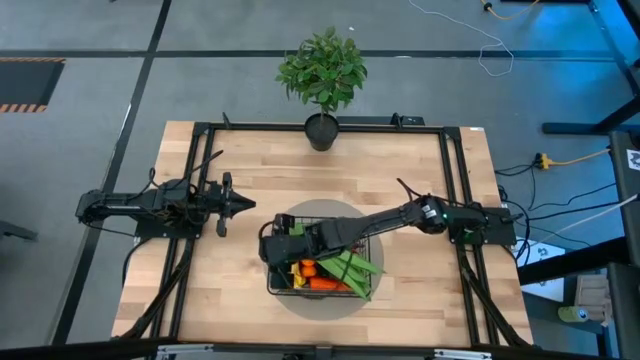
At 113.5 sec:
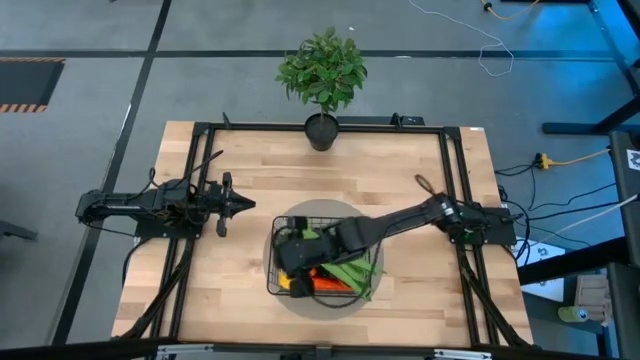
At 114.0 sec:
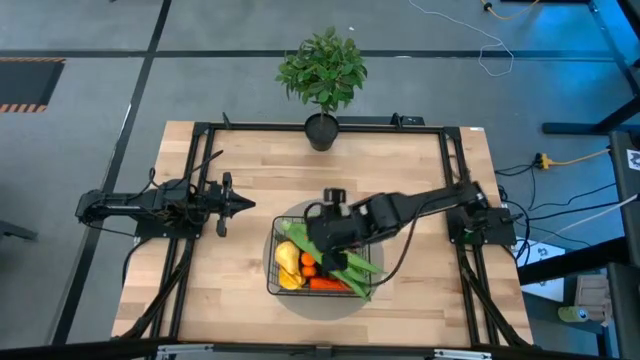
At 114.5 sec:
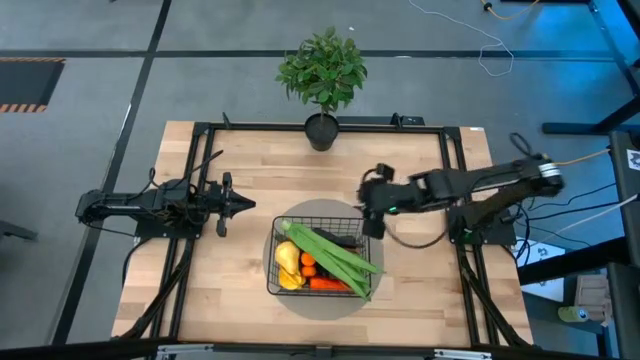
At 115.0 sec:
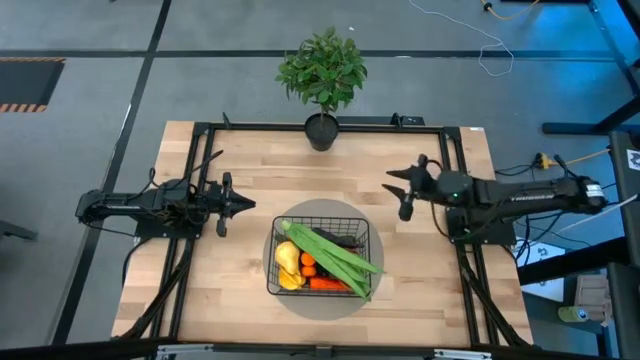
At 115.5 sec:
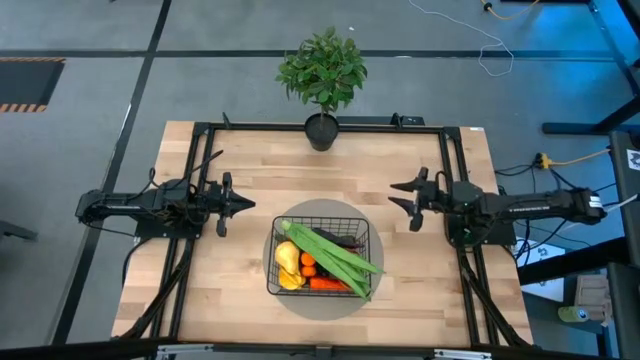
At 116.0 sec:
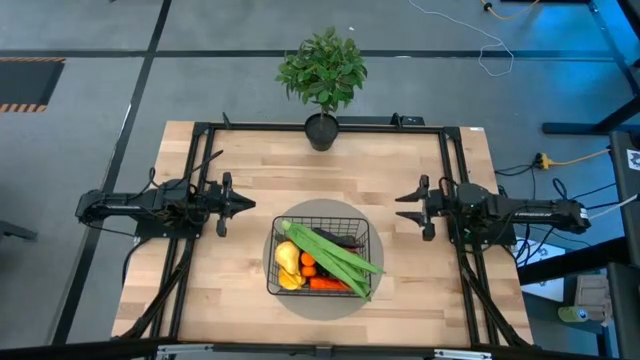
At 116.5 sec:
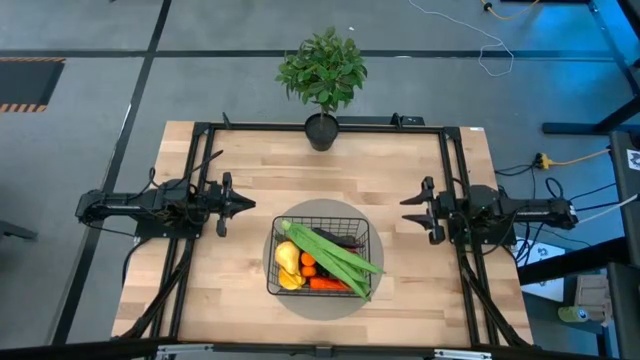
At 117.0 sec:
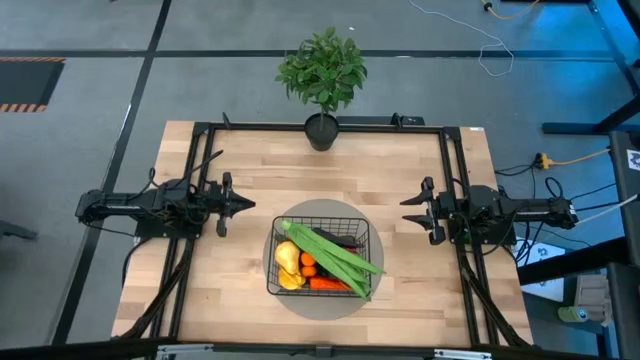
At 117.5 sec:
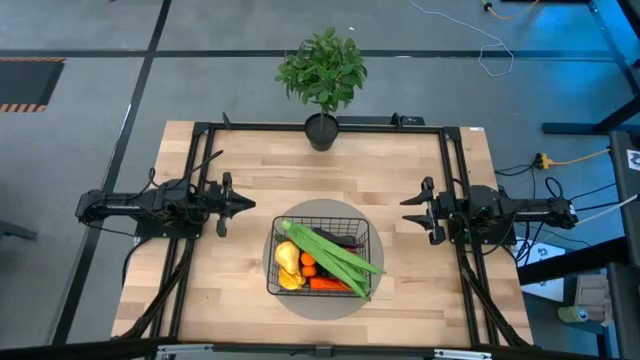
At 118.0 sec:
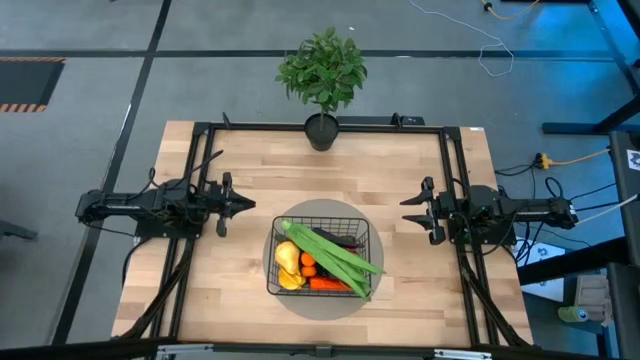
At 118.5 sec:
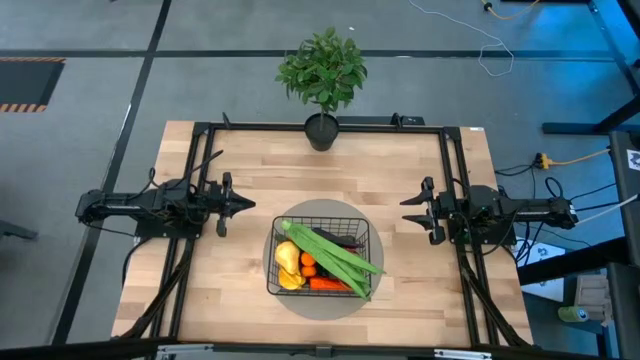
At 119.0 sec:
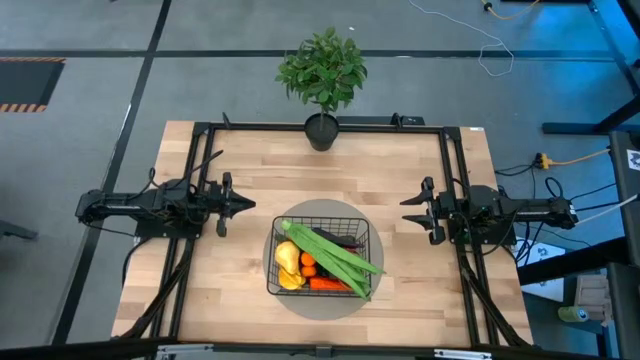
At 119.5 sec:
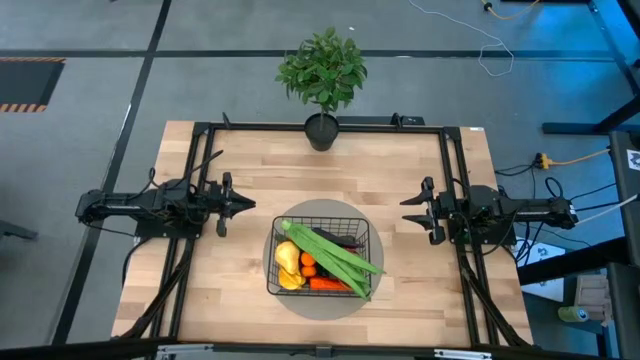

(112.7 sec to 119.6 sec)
Task: Build produce basket
Return to Home Position

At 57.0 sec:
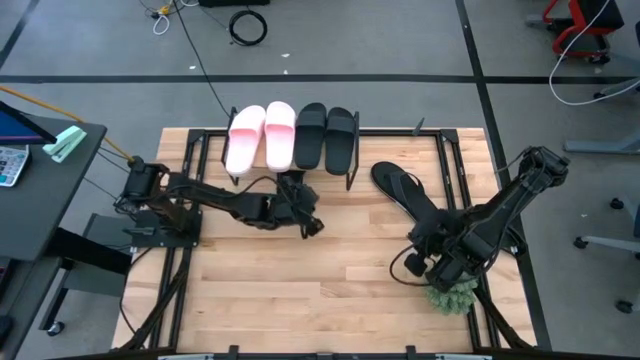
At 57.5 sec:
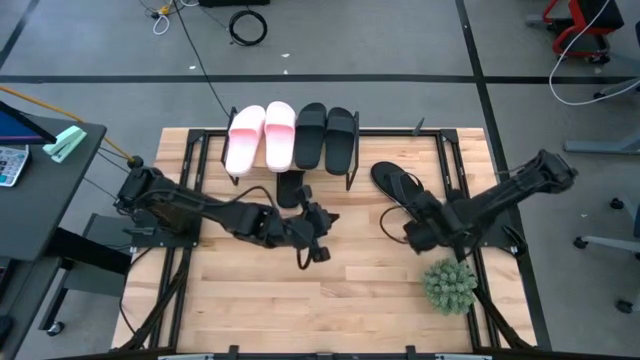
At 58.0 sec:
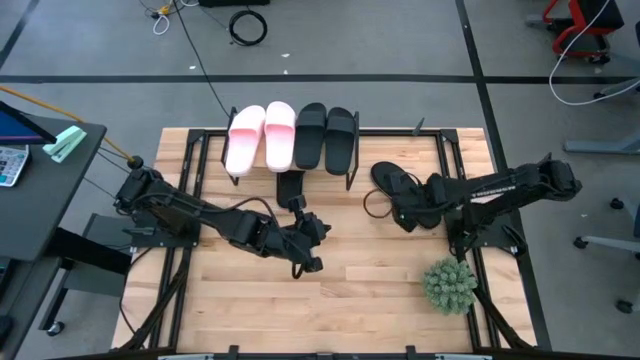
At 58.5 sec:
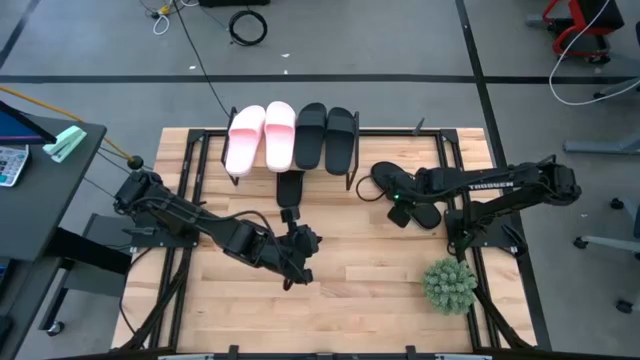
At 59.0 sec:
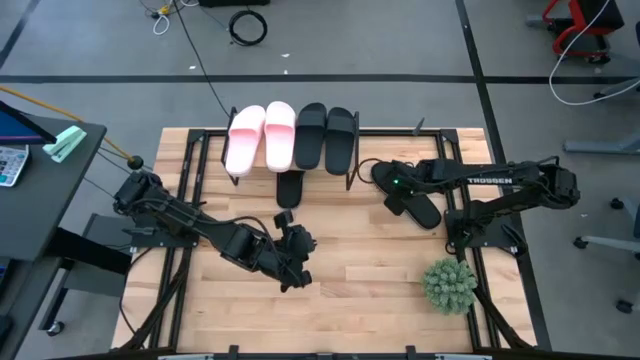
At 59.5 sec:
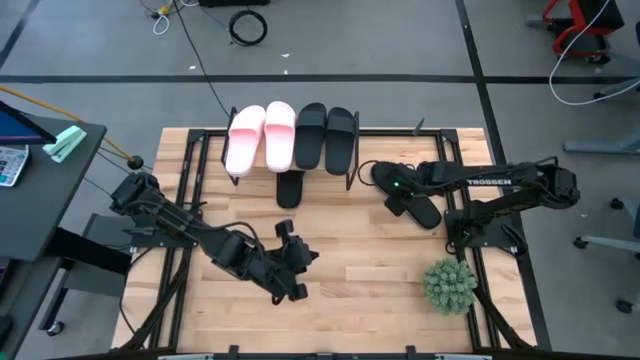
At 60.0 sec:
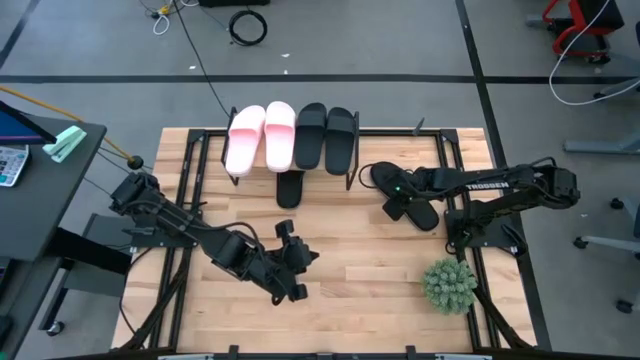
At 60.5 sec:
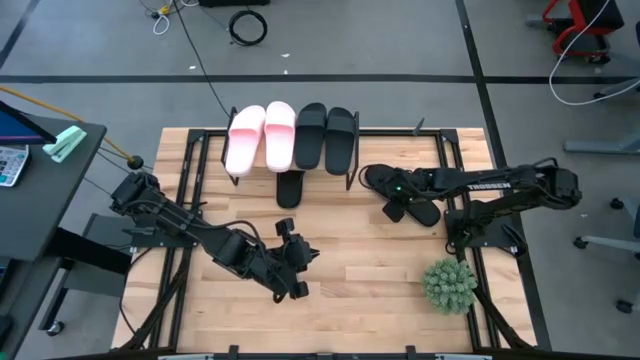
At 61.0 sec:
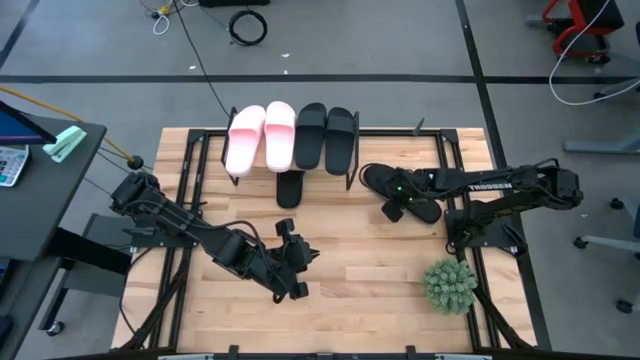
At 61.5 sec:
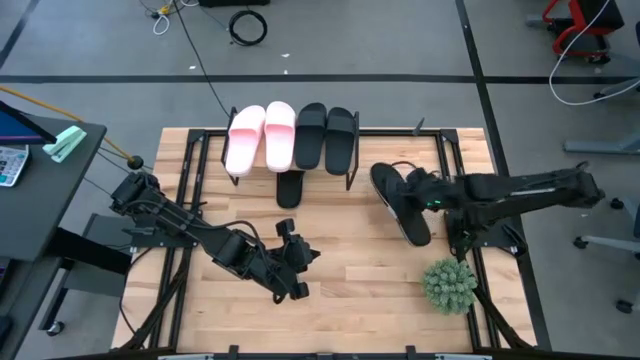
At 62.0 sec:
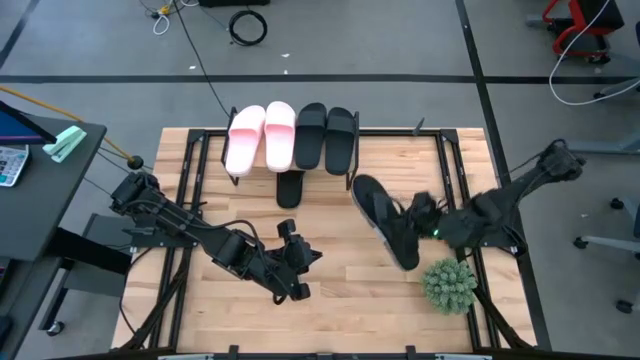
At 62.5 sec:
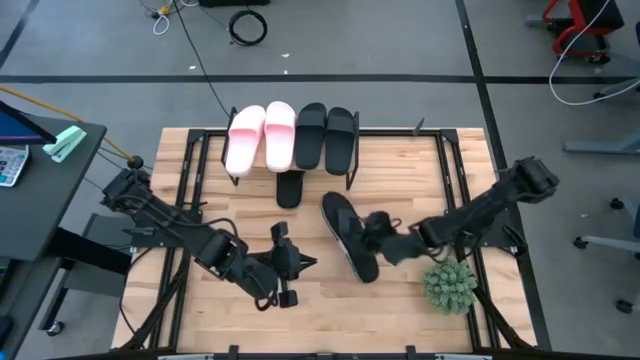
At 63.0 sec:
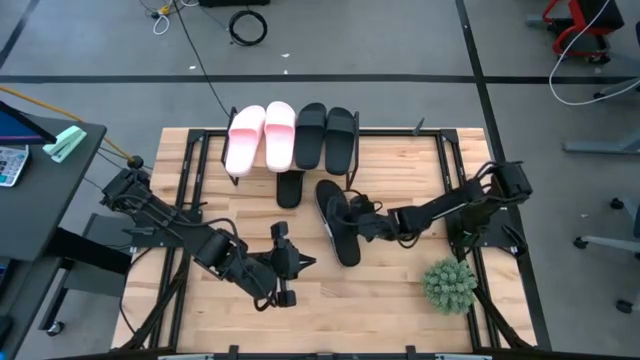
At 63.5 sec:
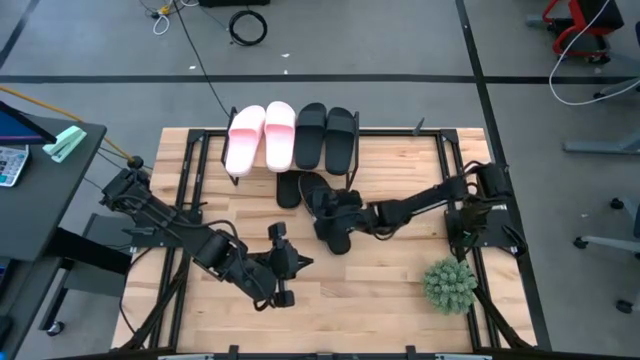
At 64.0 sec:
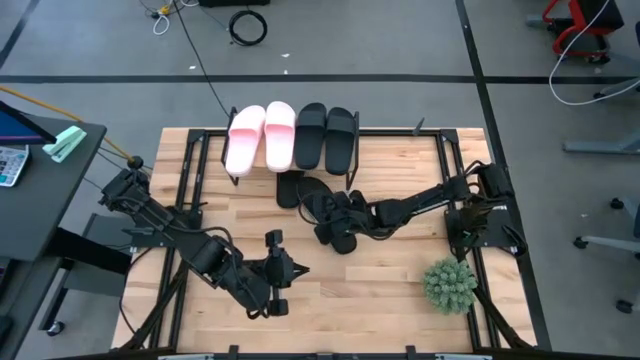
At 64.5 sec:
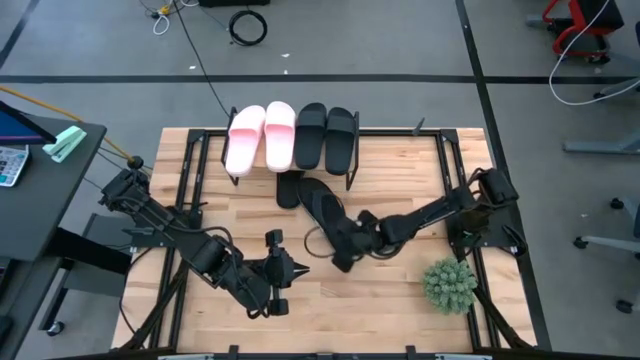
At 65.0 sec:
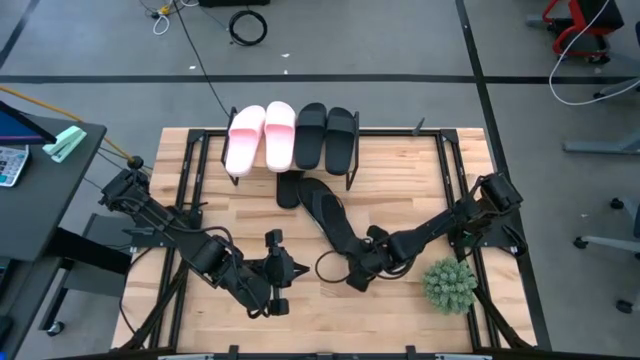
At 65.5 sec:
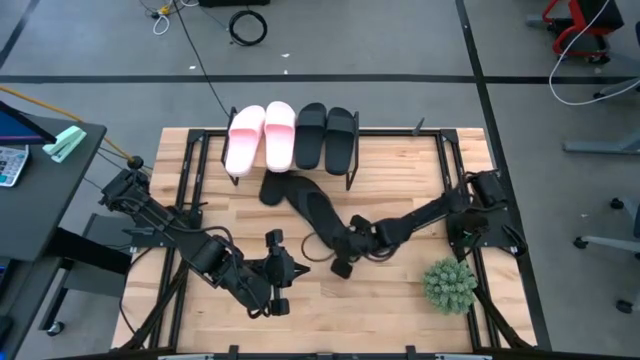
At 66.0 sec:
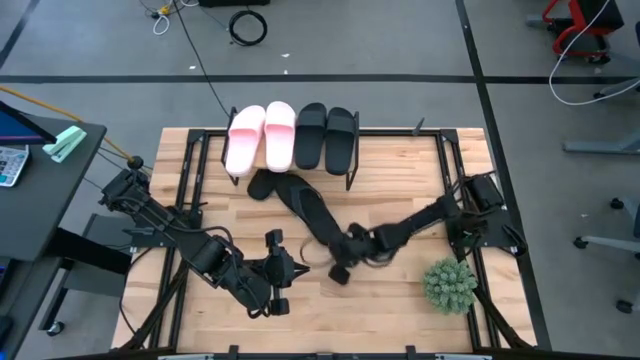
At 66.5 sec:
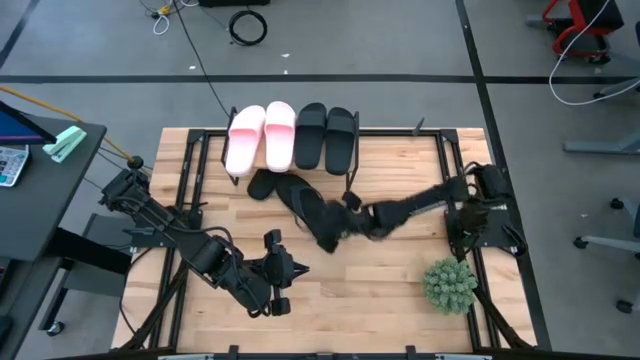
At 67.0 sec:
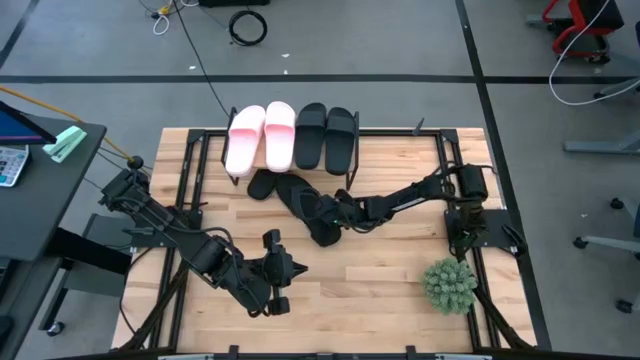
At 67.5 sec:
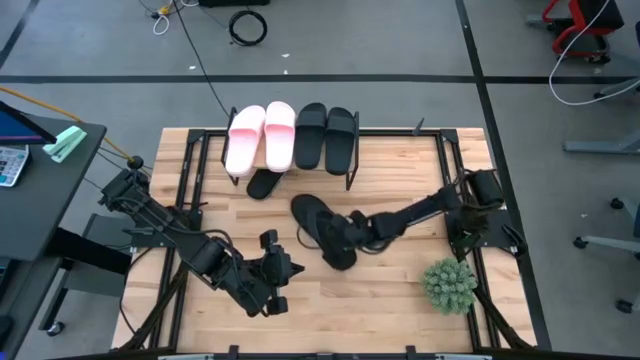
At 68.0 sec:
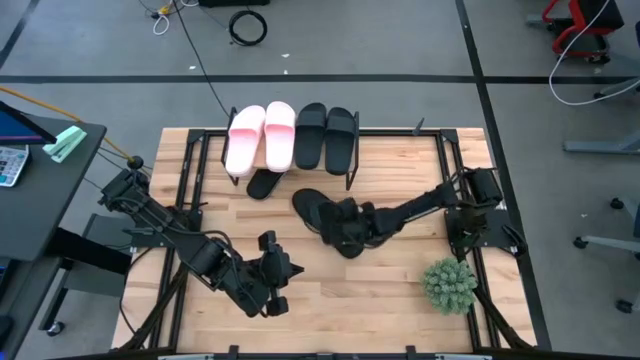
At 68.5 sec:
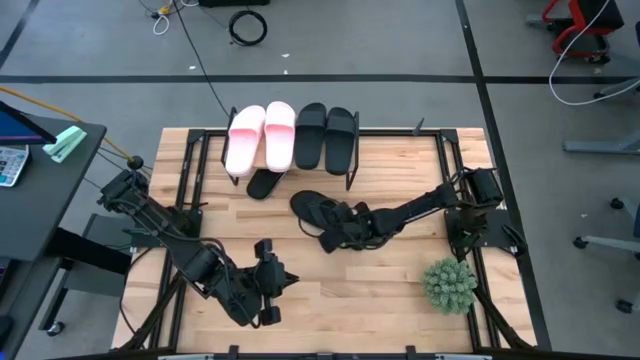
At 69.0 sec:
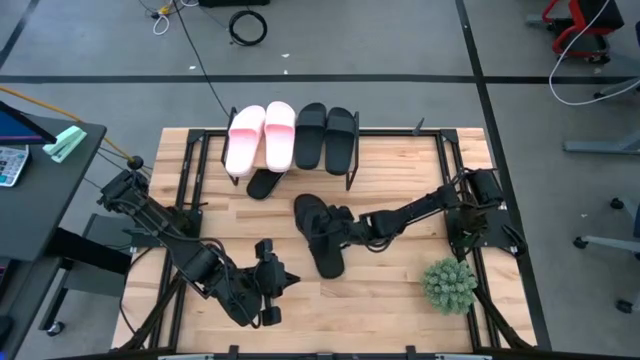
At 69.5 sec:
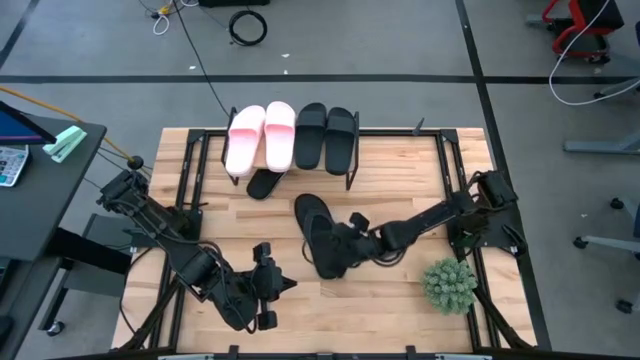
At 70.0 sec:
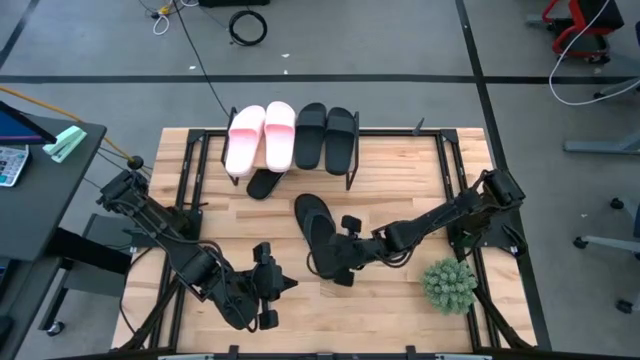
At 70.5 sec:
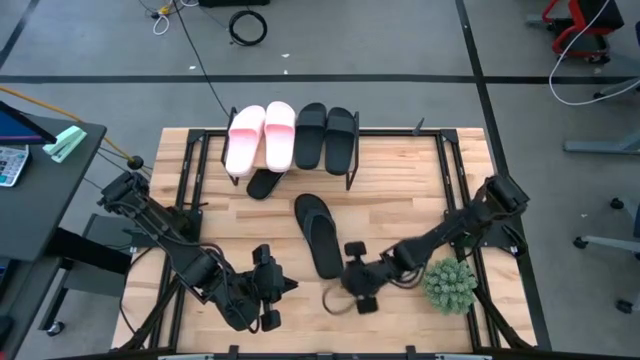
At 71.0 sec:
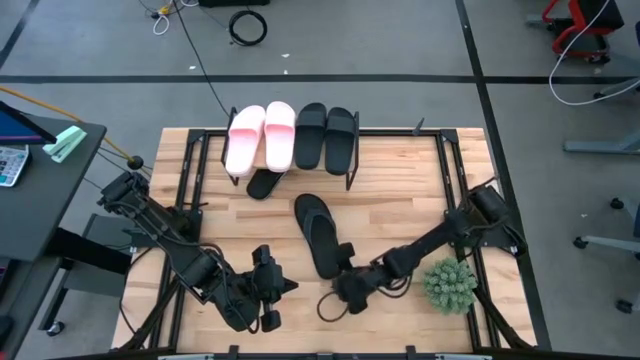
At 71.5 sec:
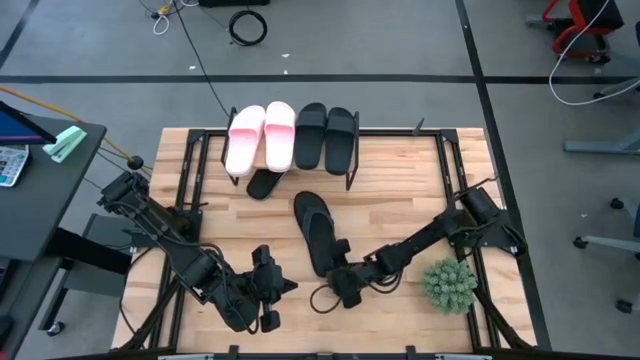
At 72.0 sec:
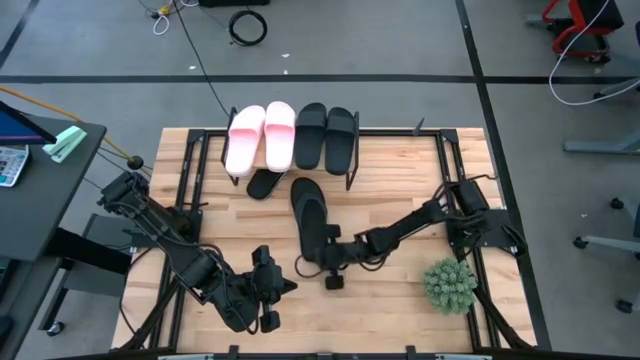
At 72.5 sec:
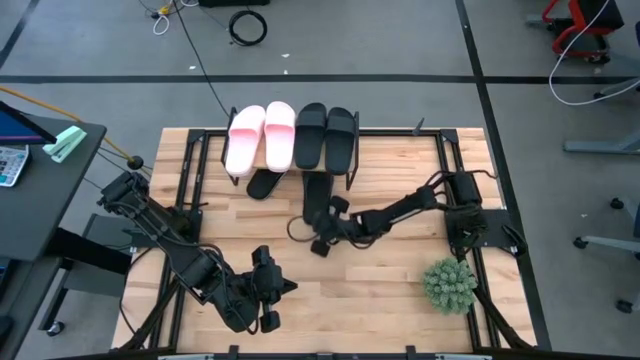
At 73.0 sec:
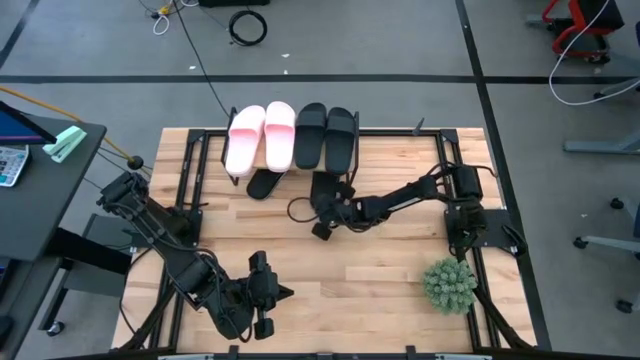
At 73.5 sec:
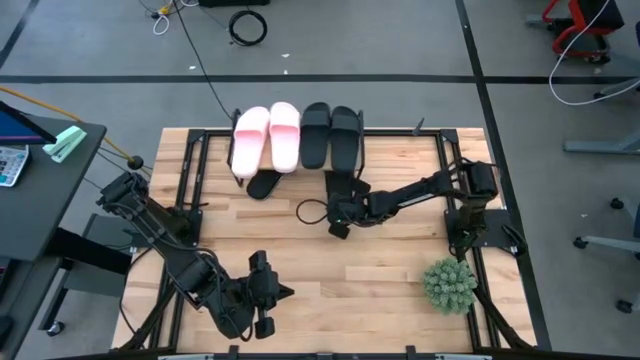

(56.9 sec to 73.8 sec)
Task: Pick and place slides into the shelf
Put the black slipper under the shelf
